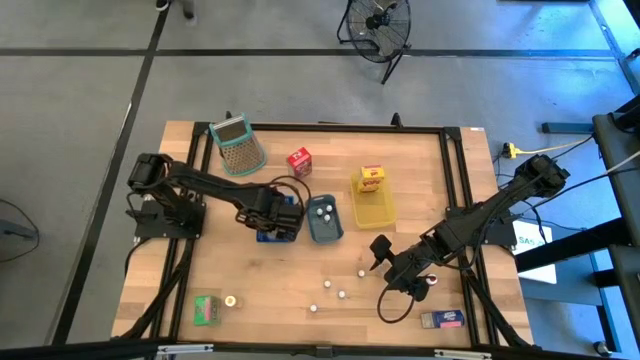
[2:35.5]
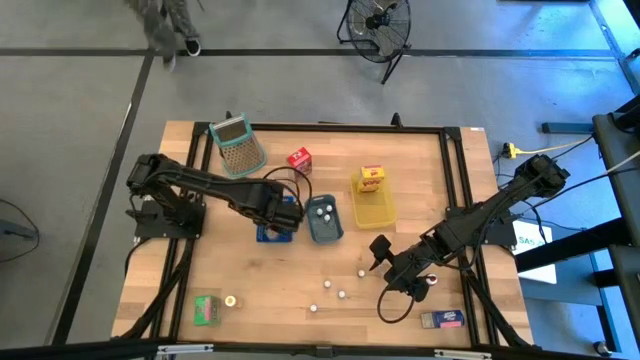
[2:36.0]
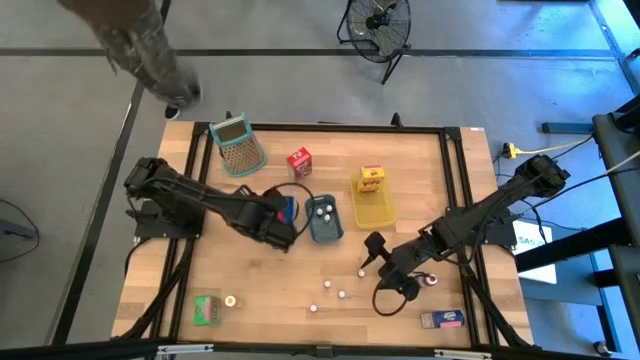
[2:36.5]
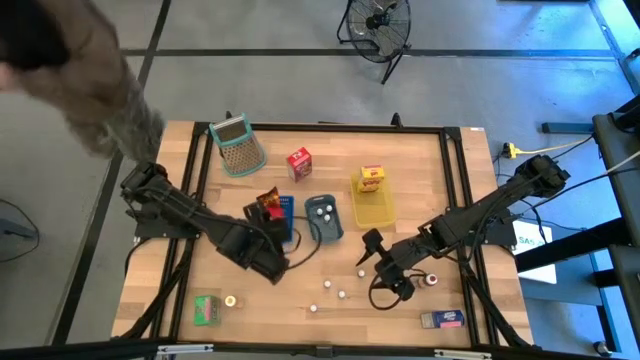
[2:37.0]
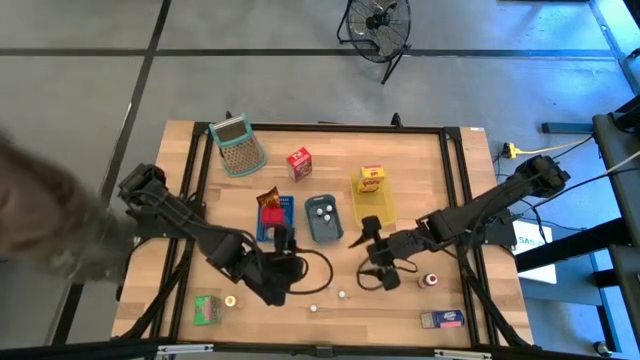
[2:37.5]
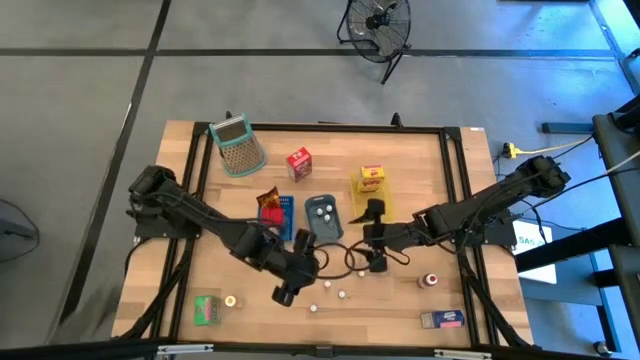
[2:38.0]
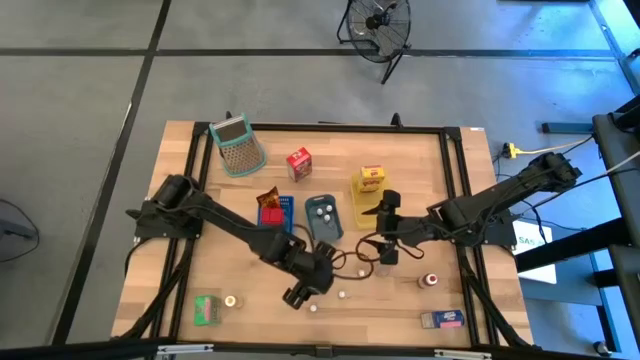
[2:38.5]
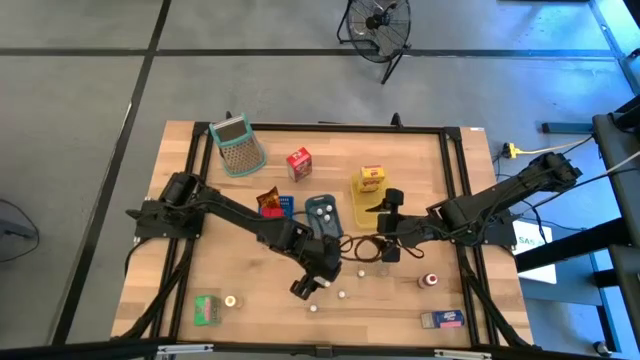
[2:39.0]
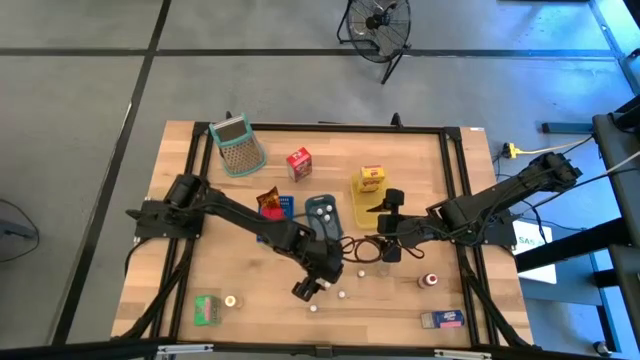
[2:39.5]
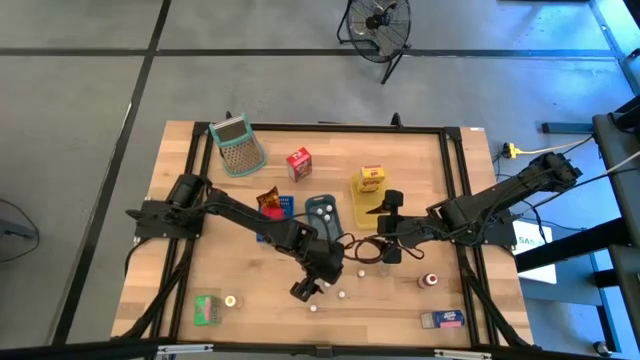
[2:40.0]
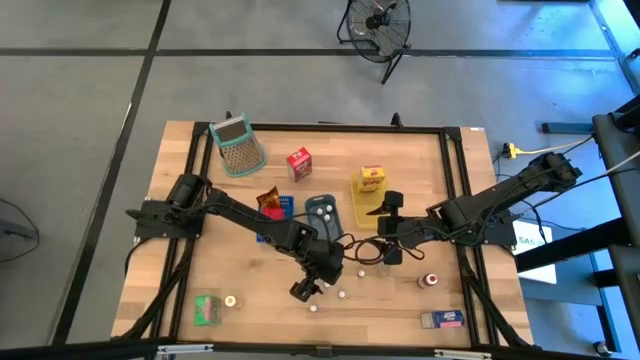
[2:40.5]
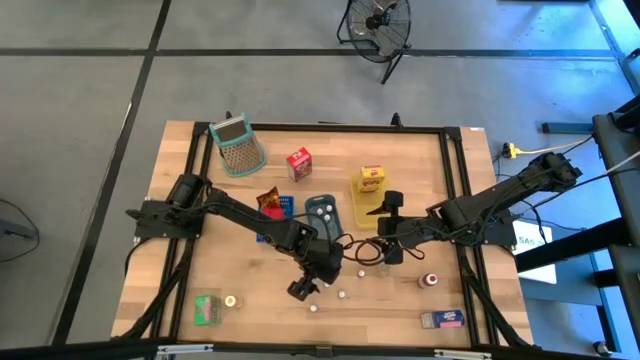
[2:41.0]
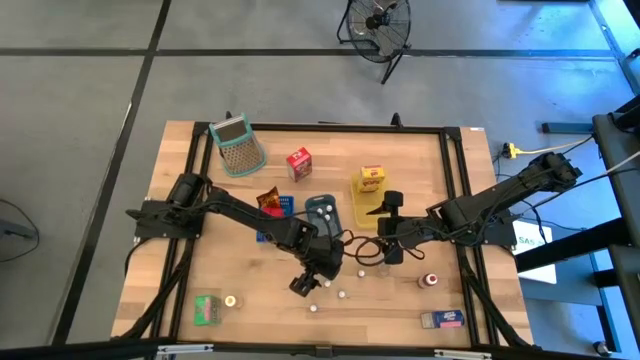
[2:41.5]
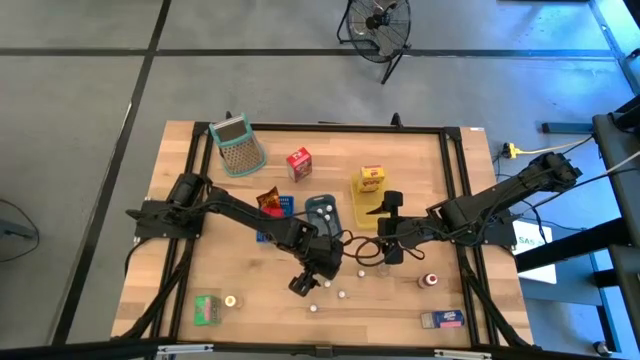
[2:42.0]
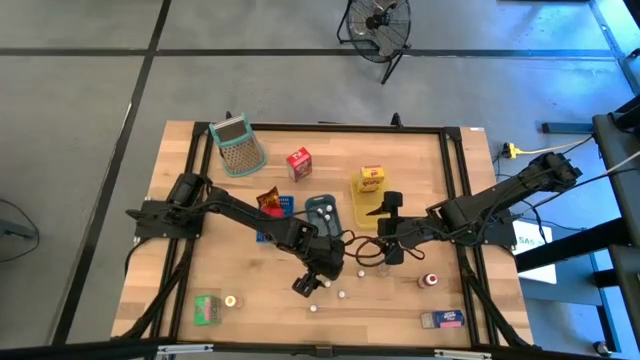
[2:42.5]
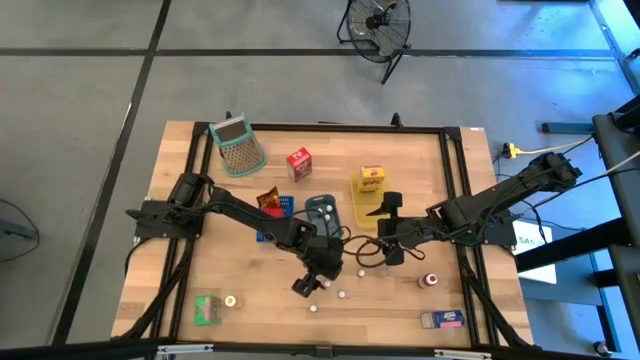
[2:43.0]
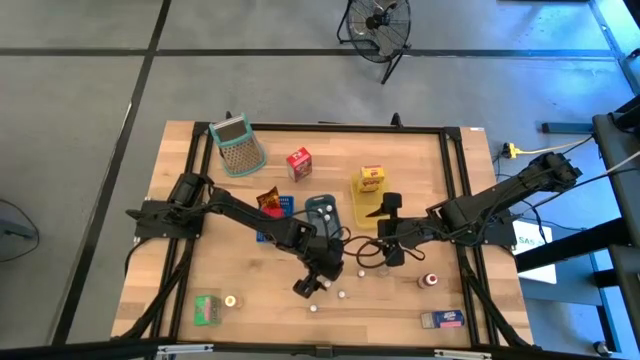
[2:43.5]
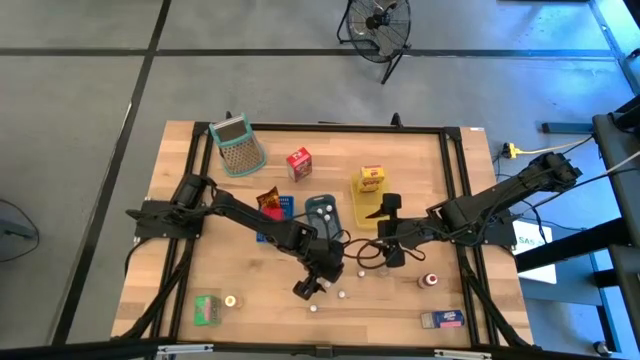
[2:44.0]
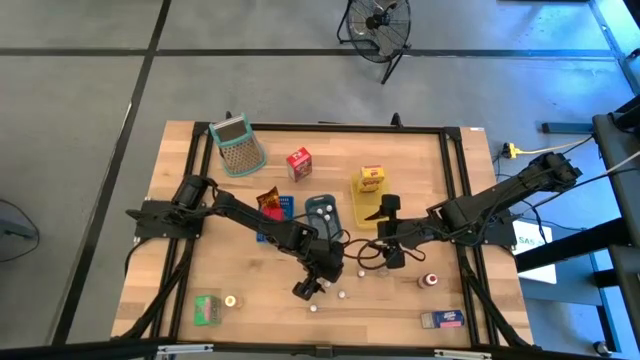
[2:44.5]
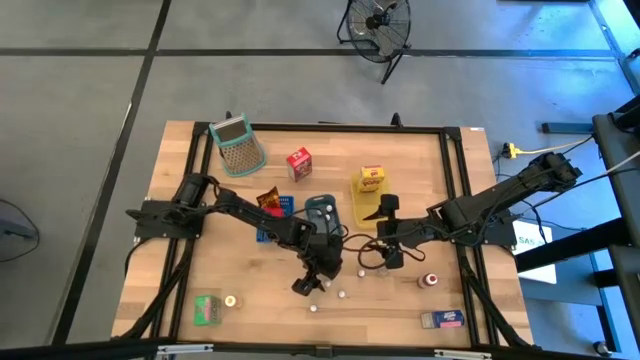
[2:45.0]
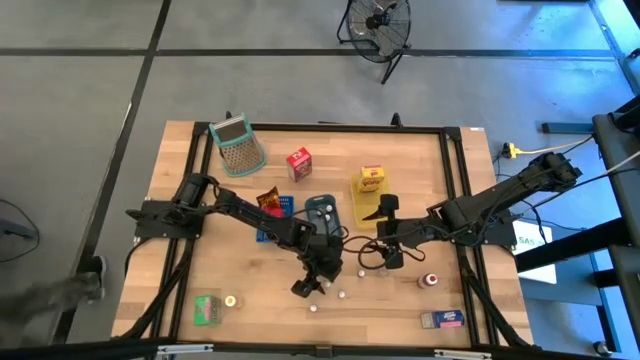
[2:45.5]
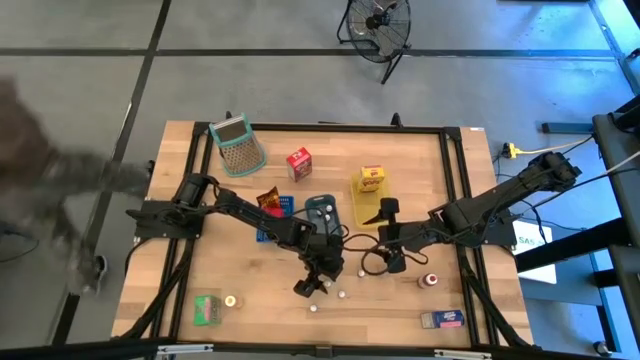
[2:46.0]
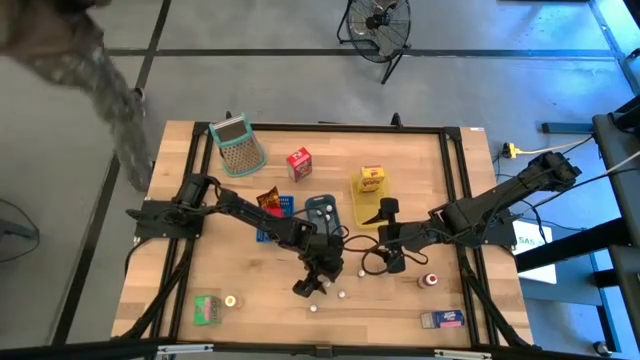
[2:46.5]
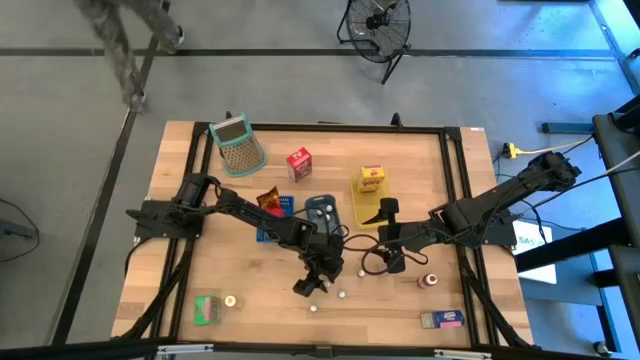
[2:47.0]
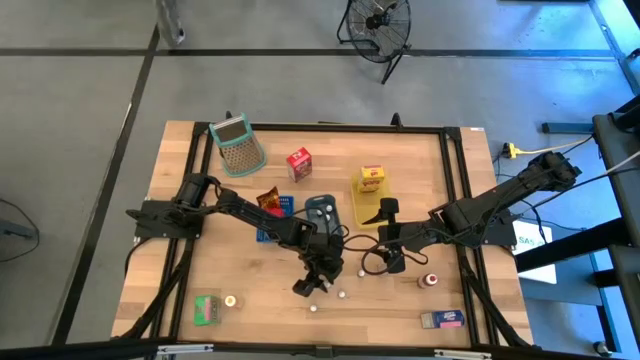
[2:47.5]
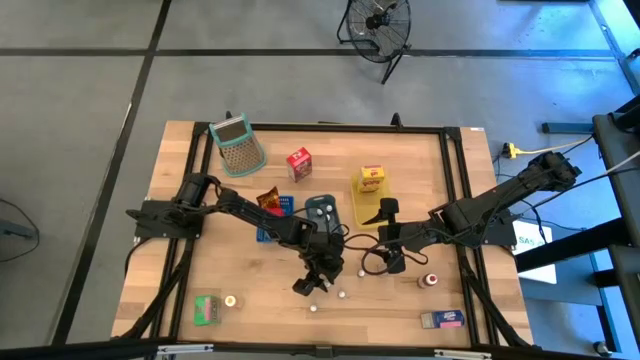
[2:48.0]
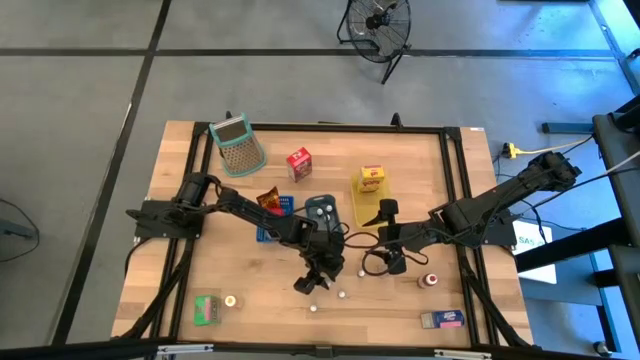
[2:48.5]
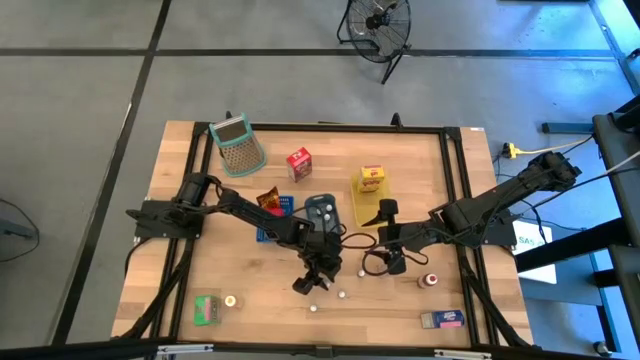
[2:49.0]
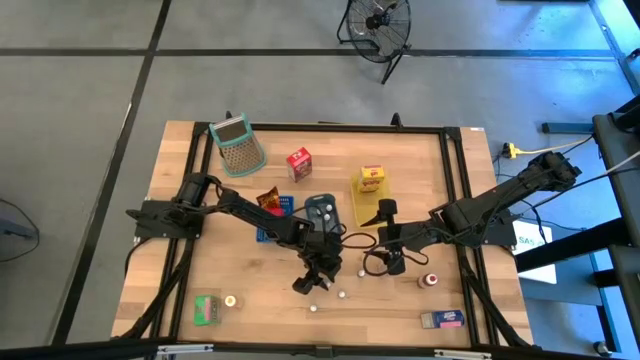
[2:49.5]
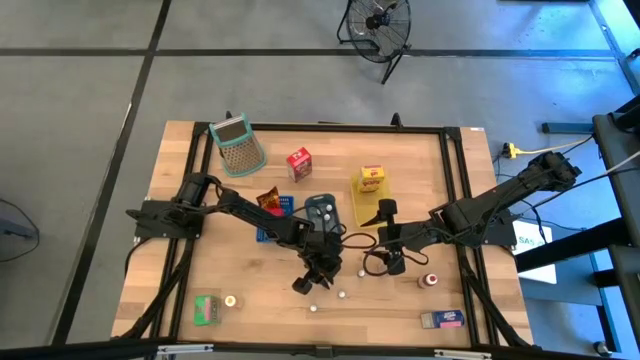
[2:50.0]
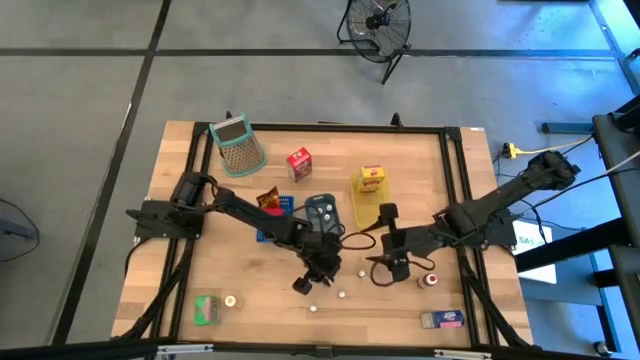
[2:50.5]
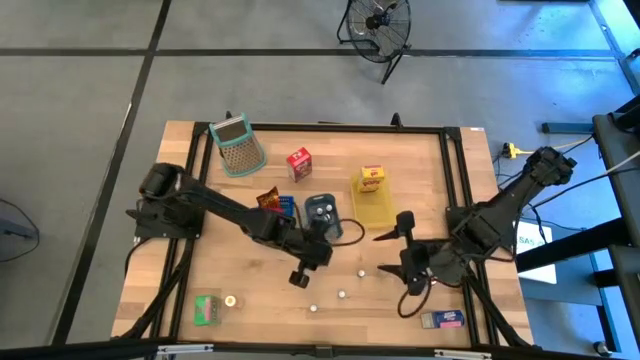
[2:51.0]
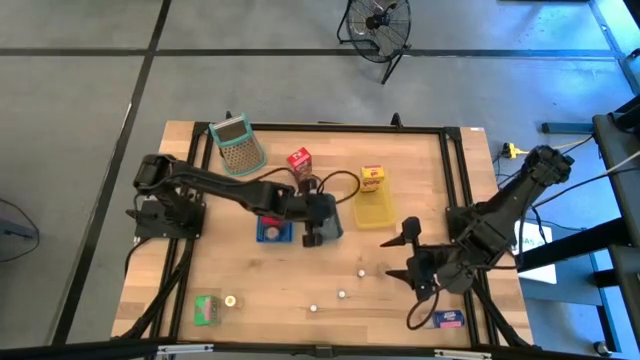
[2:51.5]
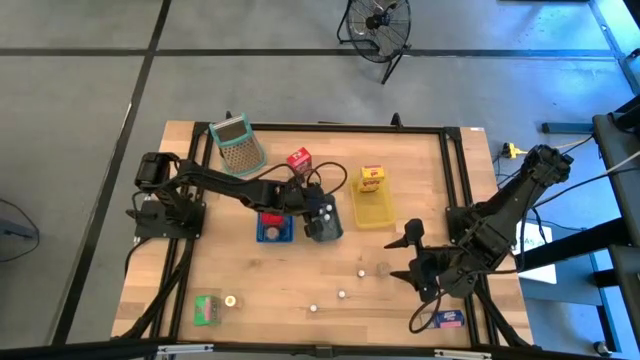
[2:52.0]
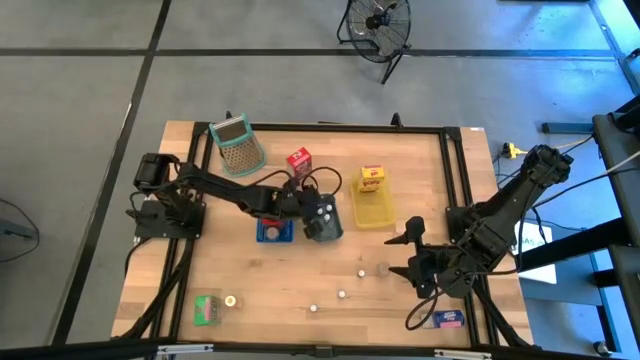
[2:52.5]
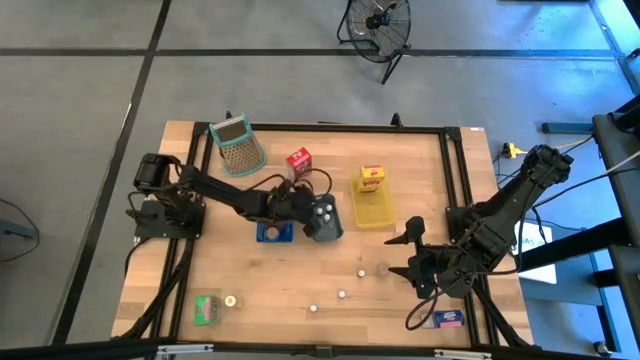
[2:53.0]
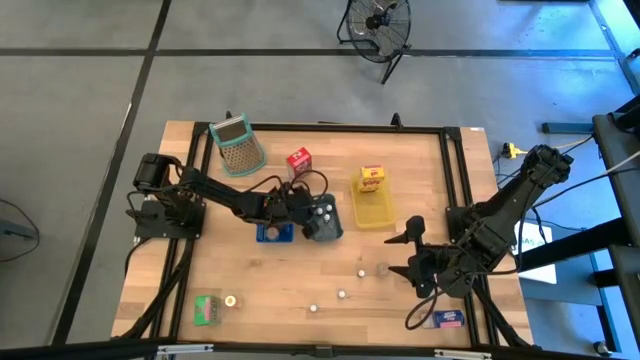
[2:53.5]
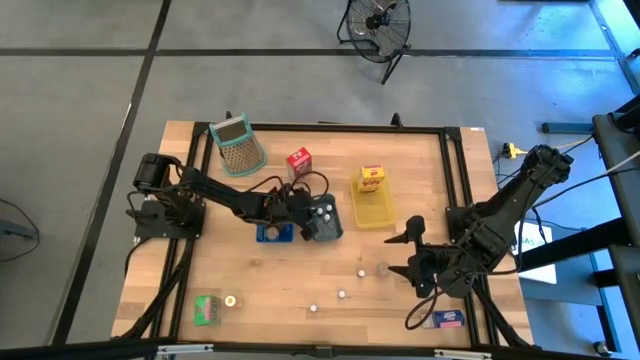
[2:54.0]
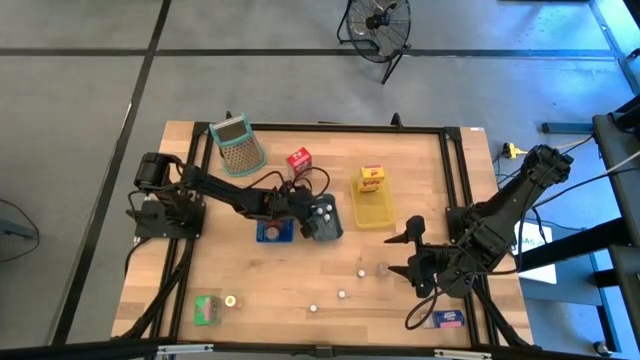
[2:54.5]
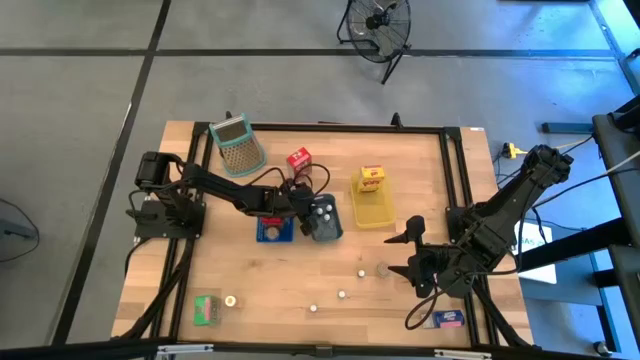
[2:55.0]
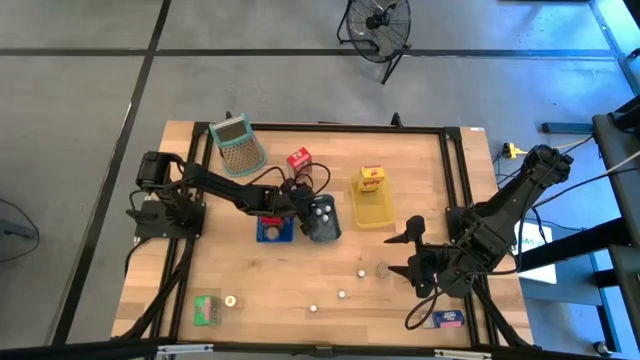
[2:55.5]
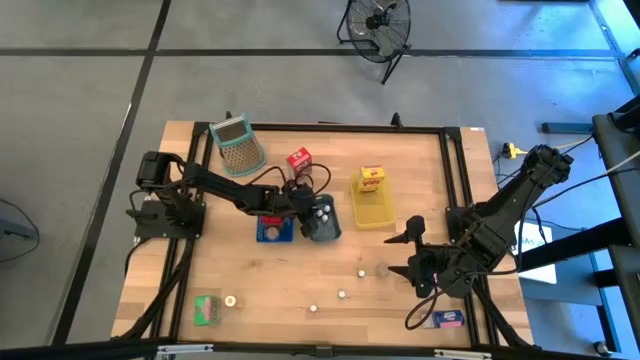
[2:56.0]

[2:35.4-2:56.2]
Task: Pick & Place Kitchen Items
Put the small food coloring bottle into the gray bin
